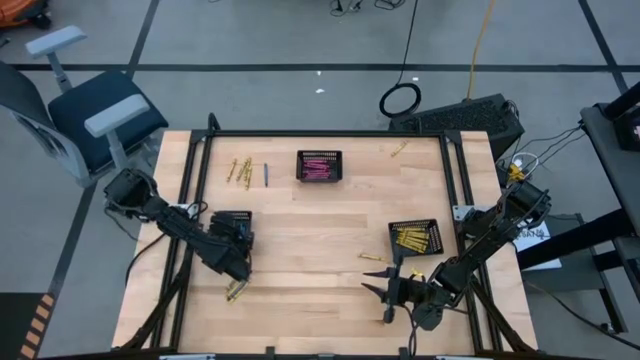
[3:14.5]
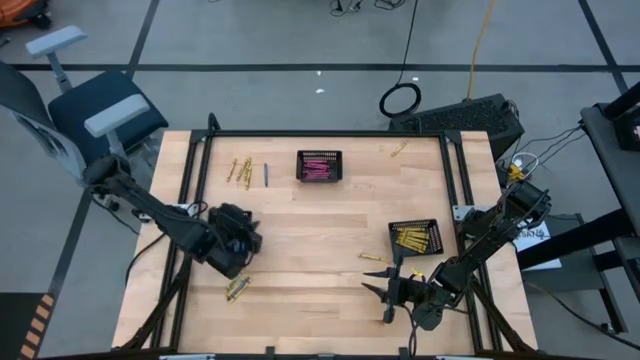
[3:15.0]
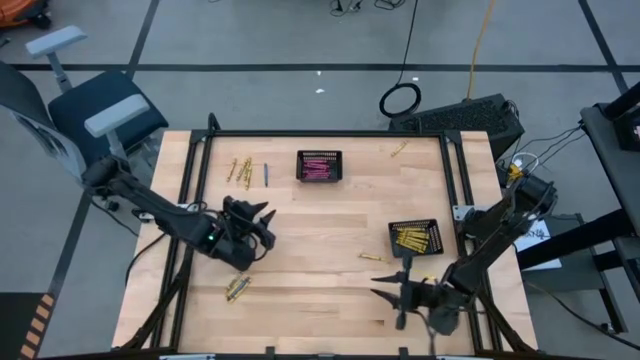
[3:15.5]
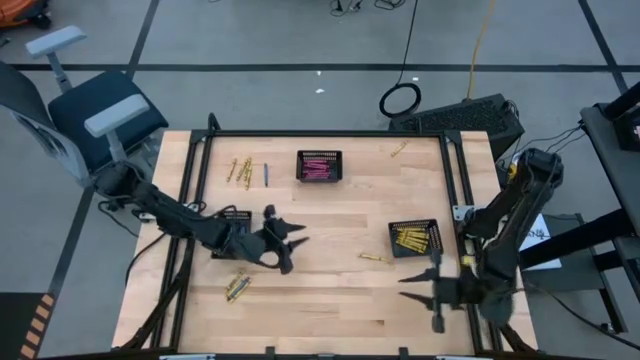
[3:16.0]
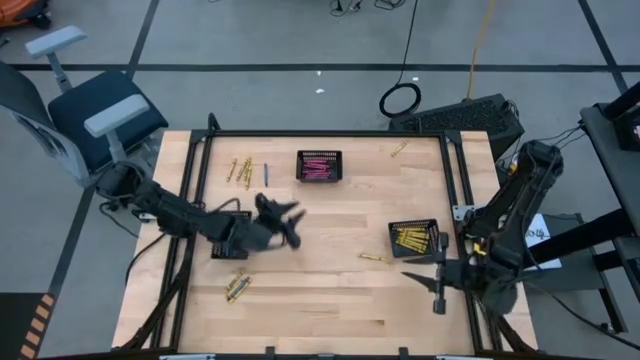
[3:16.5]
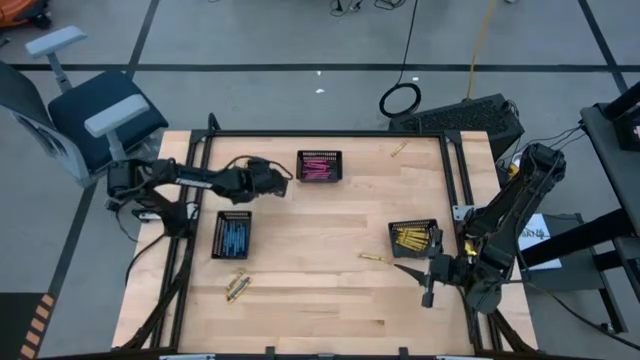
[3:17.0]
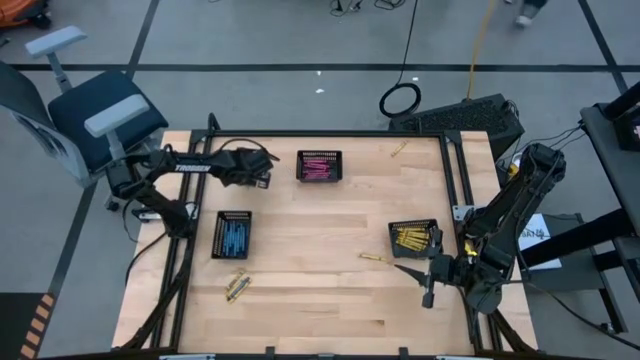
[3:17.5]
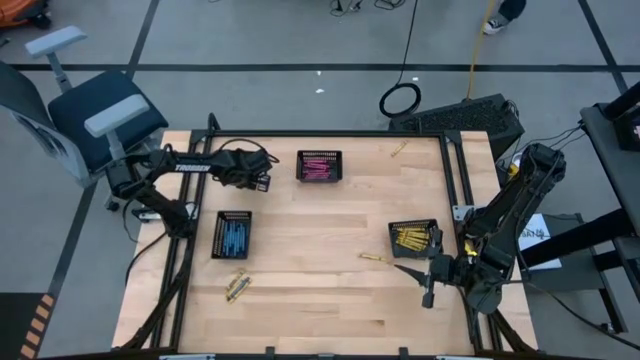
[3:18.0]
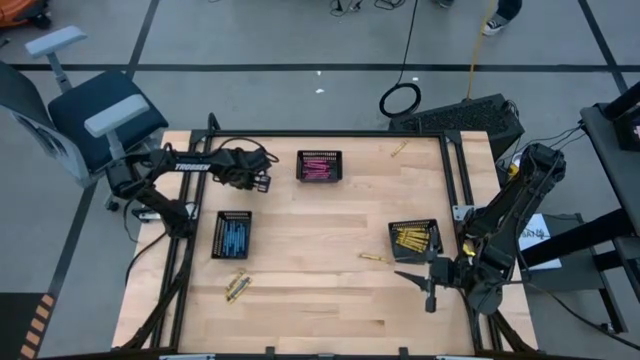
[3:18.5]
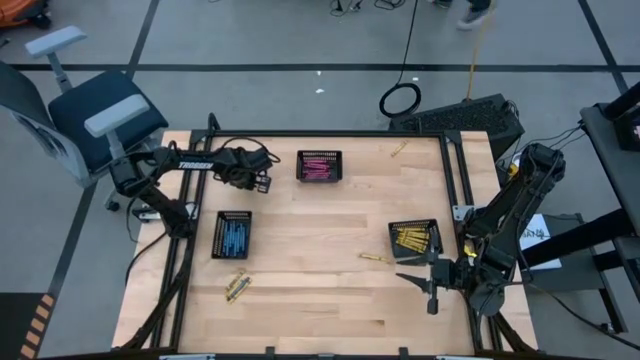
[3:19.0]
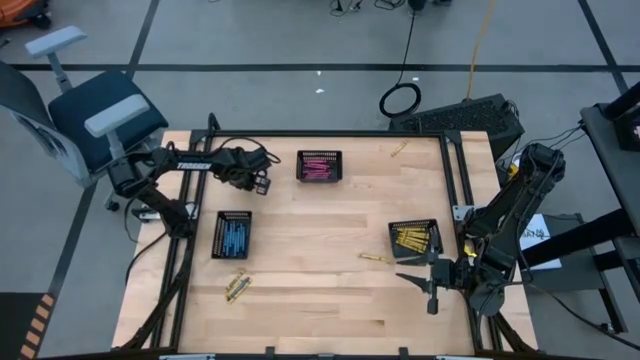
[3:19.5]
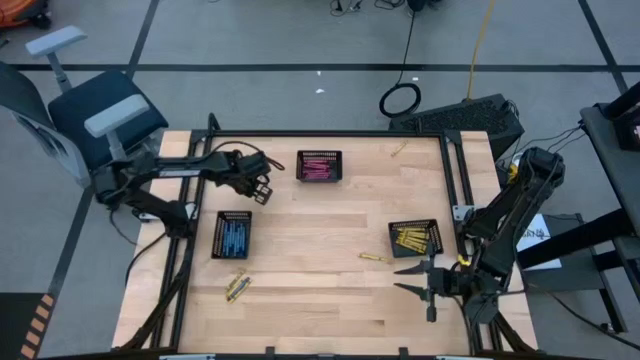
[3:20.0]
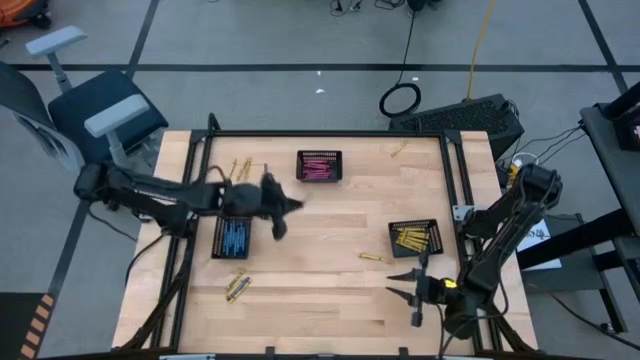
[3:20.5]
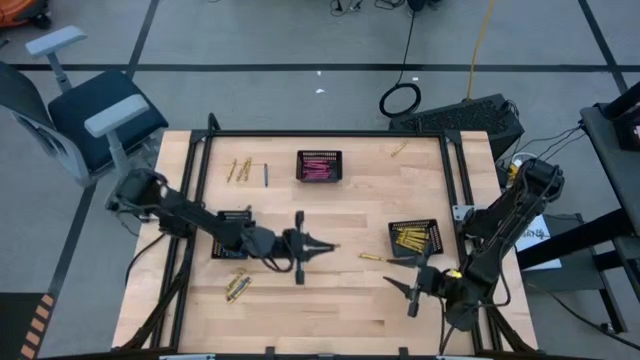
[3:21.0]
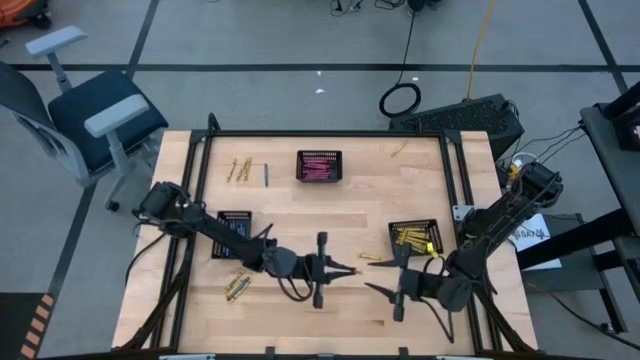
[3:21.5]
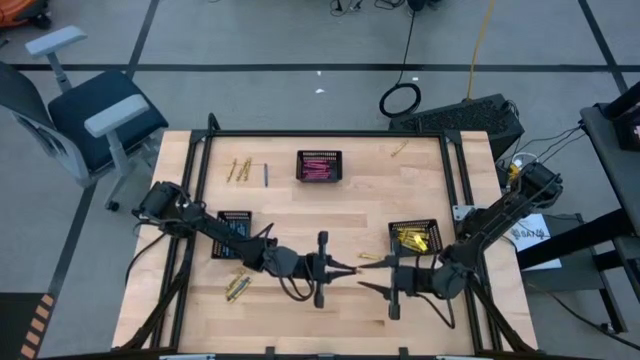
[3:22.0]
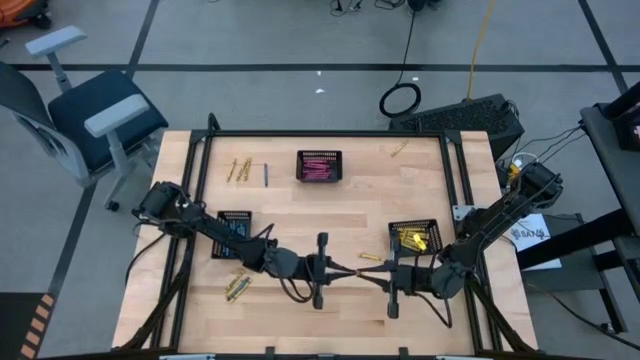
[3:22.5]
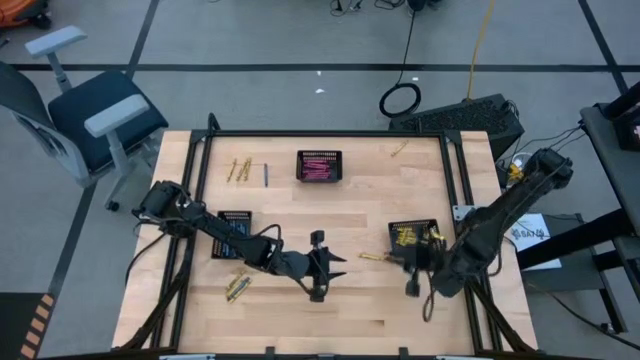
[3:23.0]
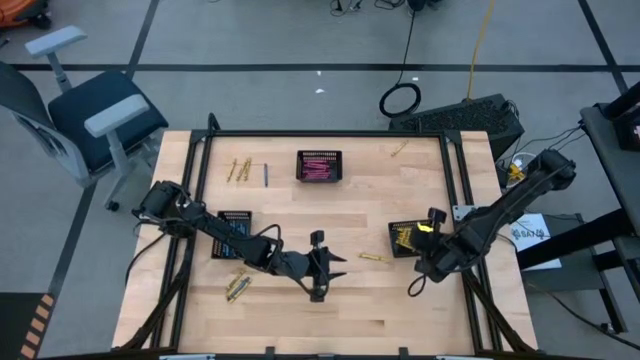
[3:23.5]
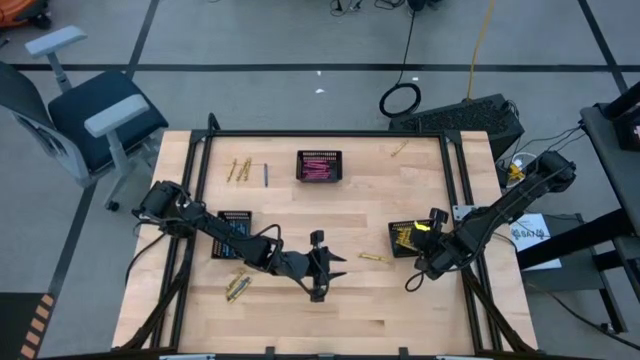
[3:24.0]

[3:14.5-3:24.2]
Task: Sort crayons
Put the yellow crayon into the bottom right black bin

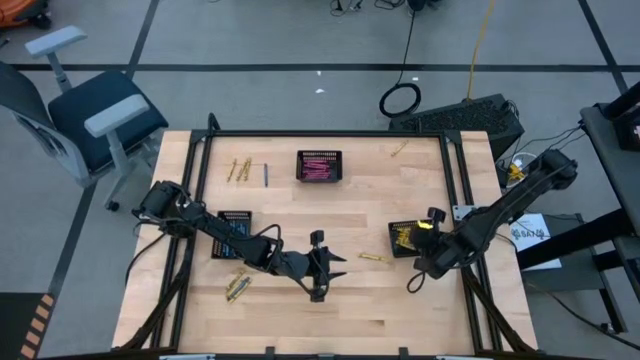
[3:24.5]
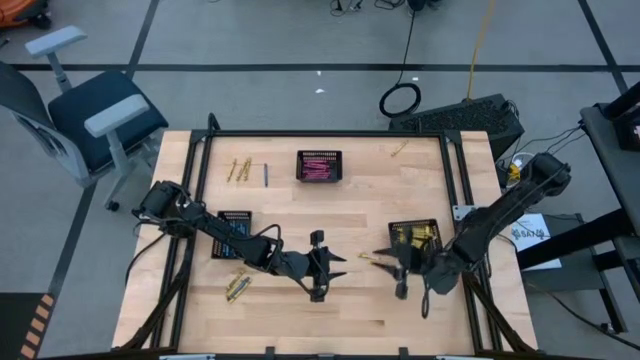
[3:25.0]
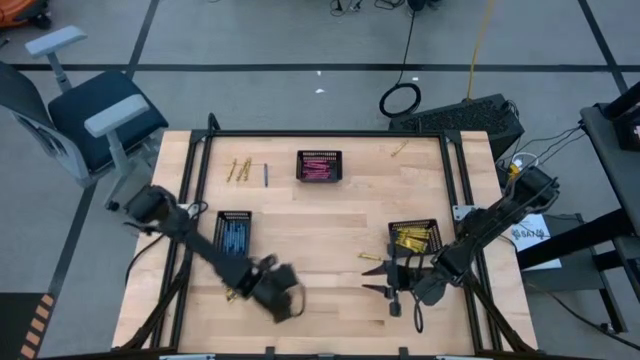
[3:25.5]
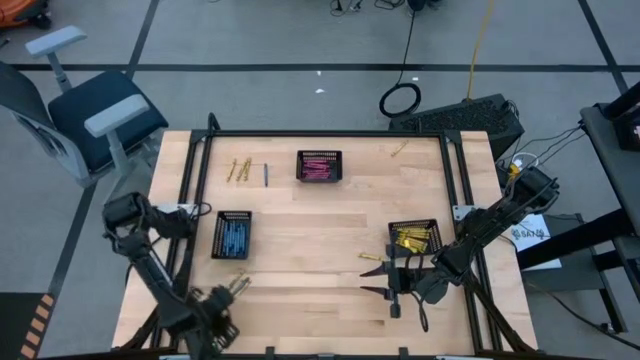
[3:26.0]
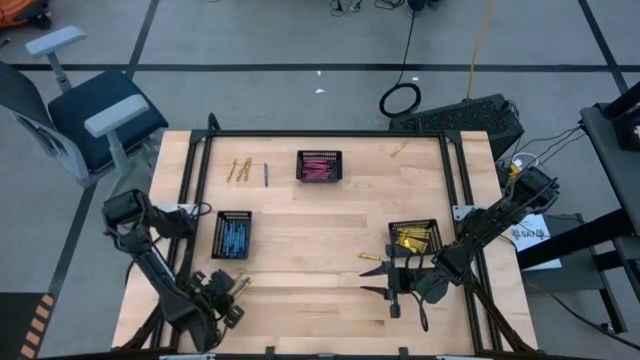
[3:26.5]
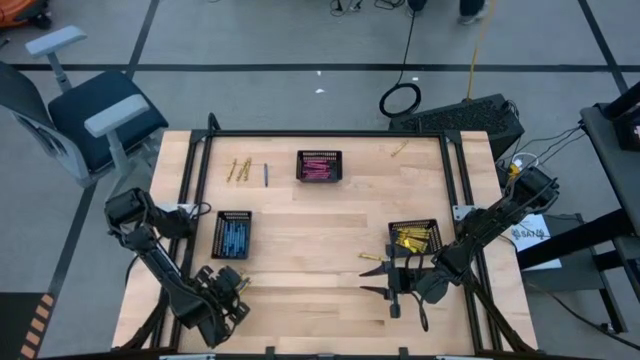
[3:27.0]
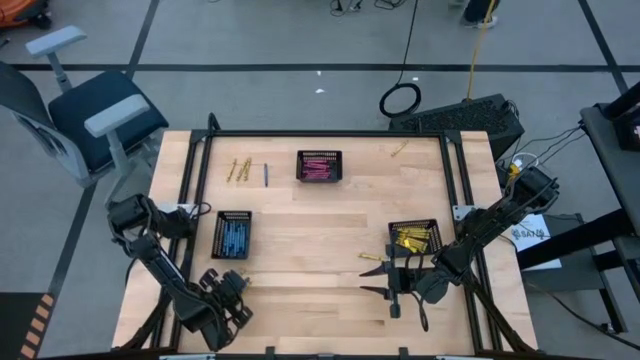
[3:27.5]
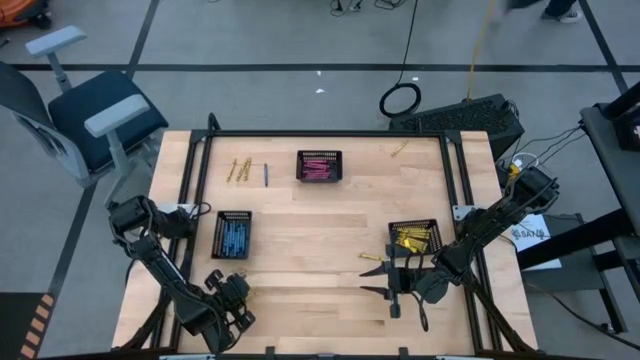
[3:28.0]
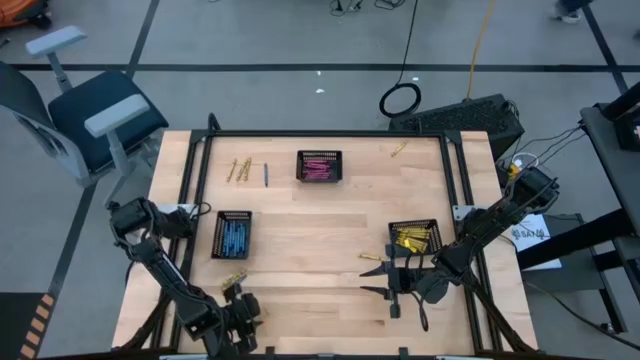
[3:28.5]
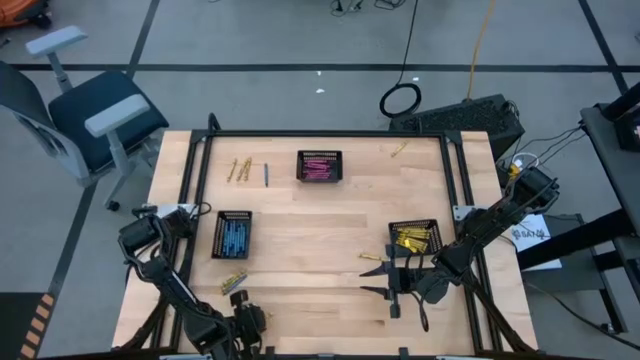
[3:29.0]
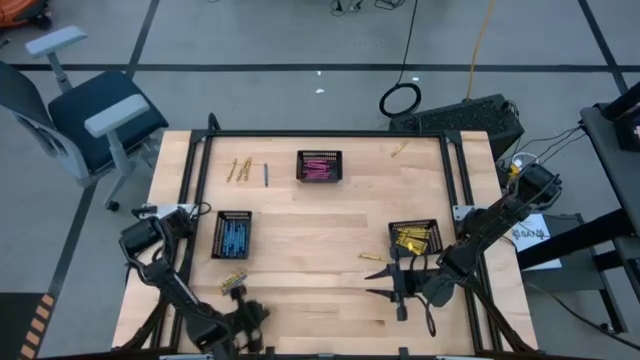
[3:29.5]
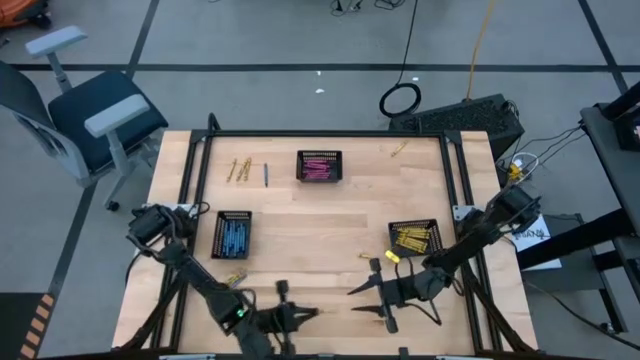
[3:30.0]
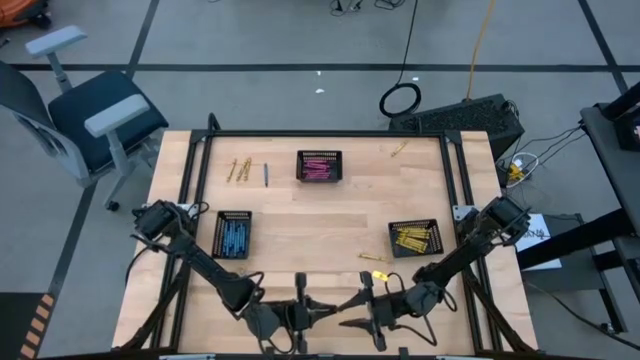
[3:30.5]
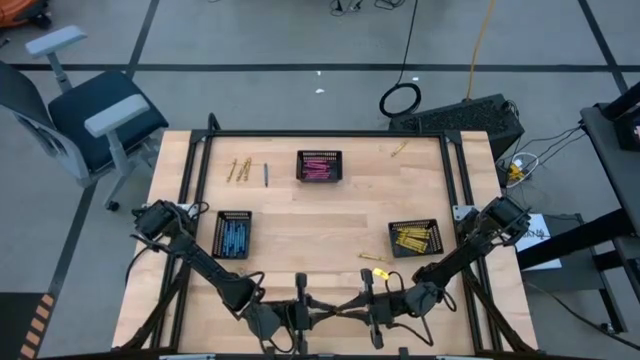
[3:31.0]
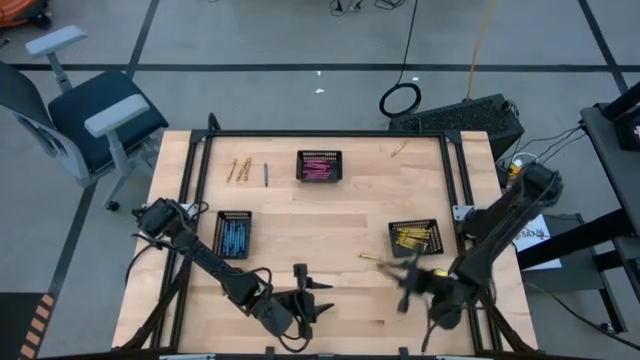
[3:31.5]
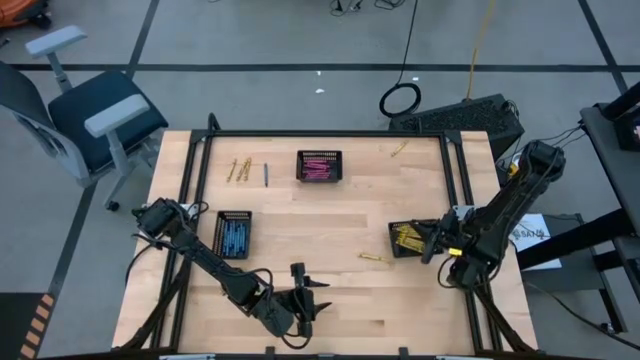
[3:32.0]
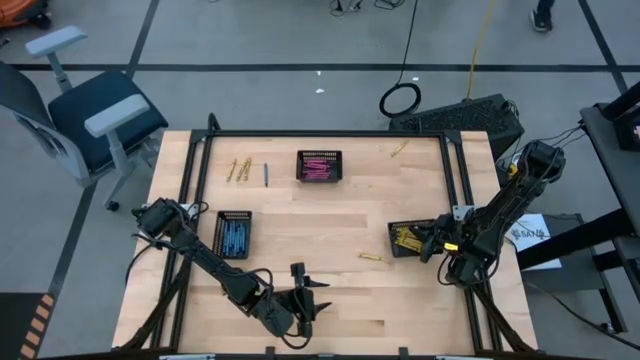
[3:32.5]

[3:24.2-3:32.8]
Put the yellow crayon into the bottom right black bin

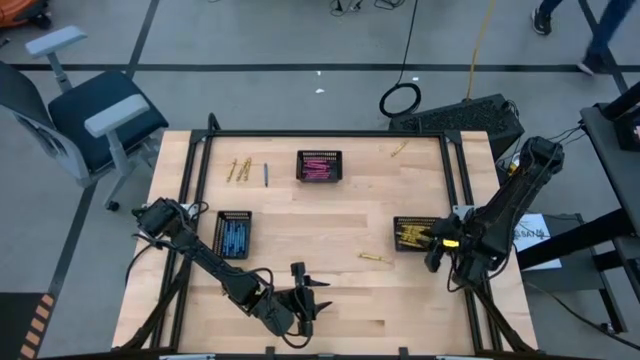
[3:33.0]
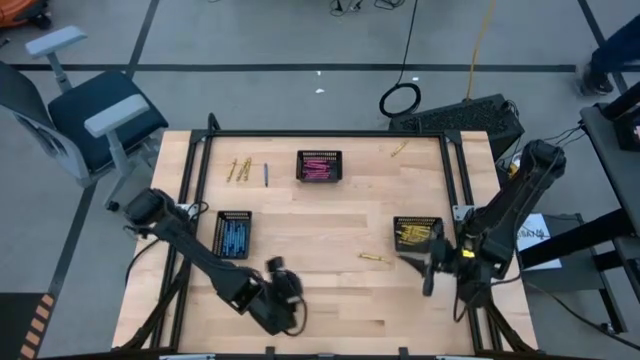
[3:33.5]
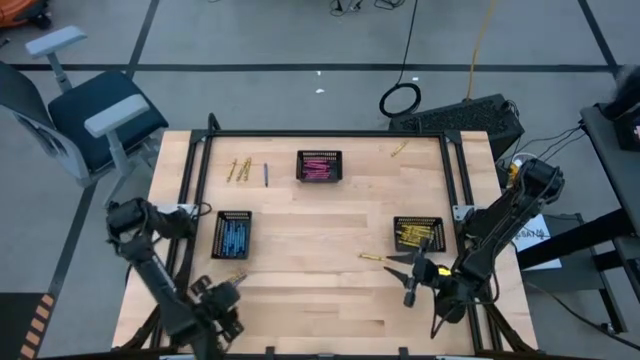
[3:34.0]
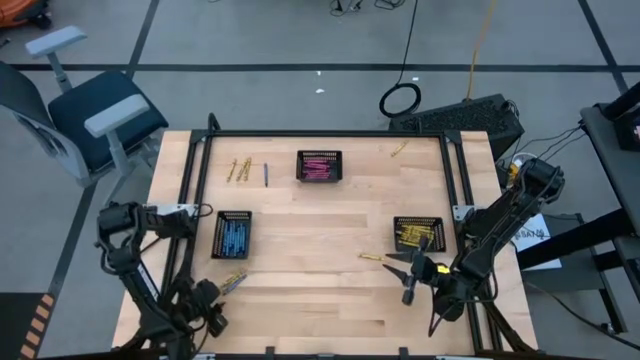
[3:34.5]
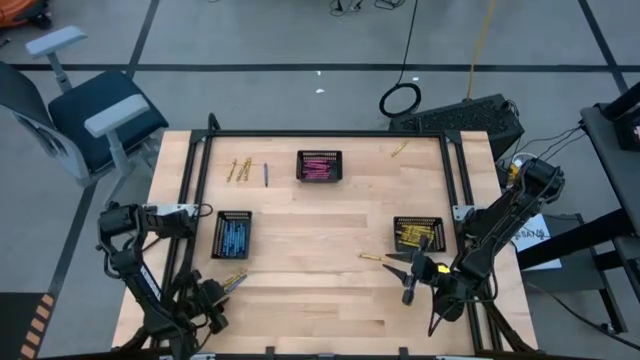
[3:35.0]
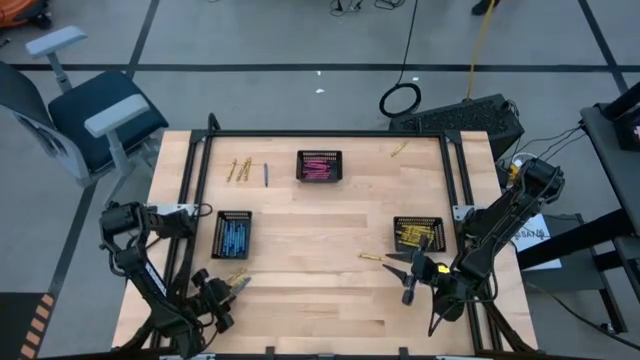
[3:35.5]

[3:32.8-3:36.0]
Put the bottom blue crayon into the bottom left black bin
